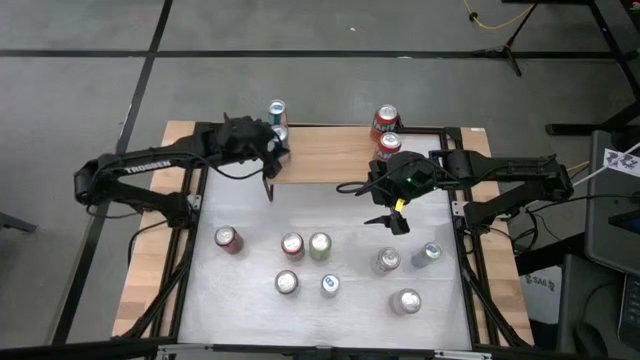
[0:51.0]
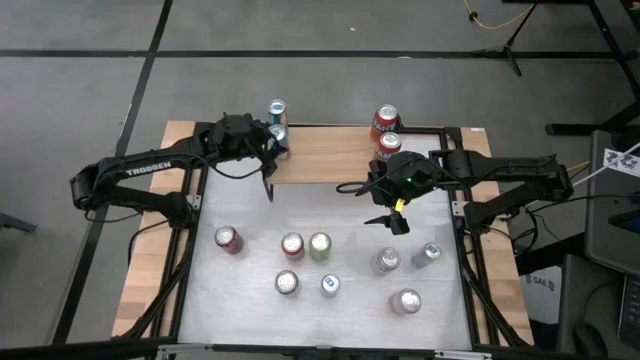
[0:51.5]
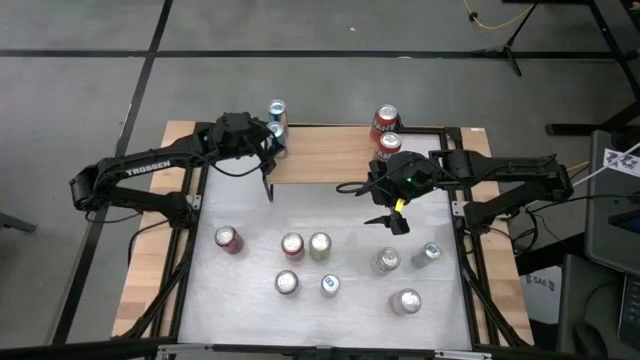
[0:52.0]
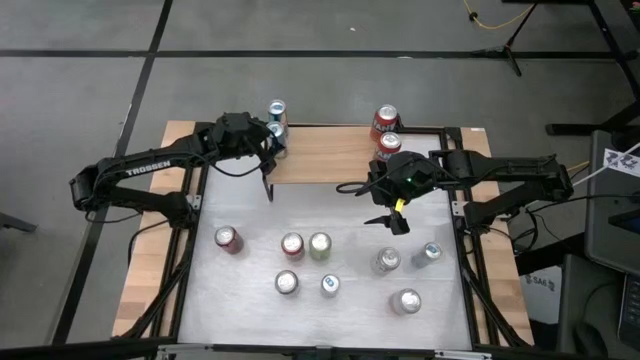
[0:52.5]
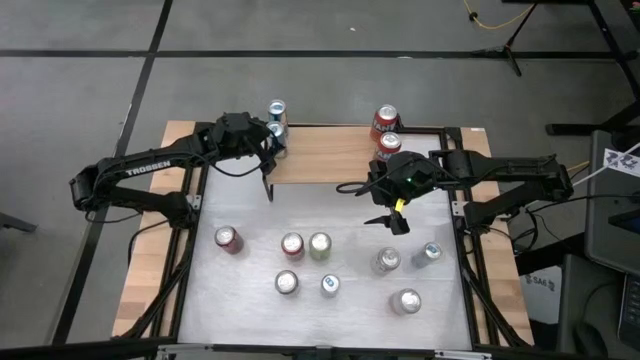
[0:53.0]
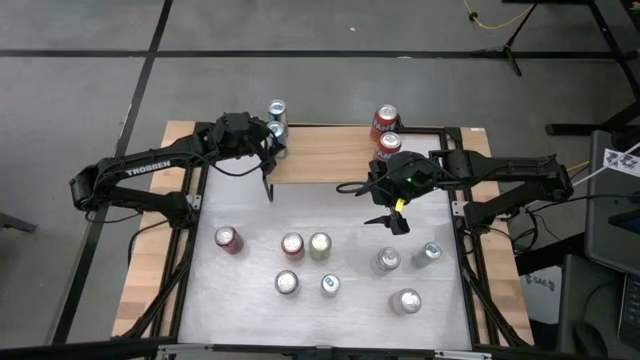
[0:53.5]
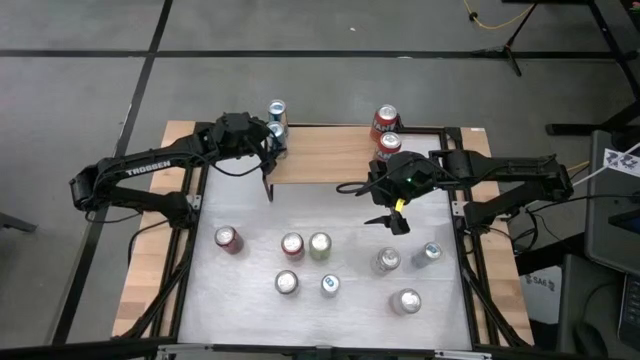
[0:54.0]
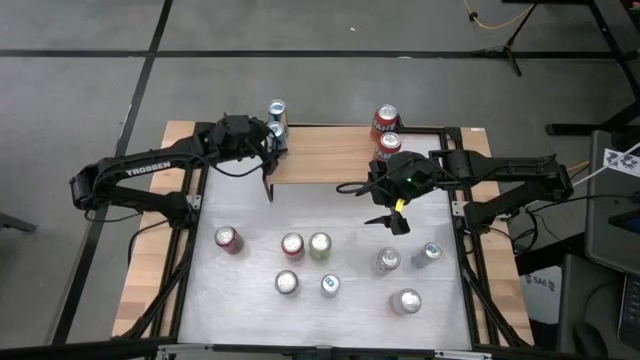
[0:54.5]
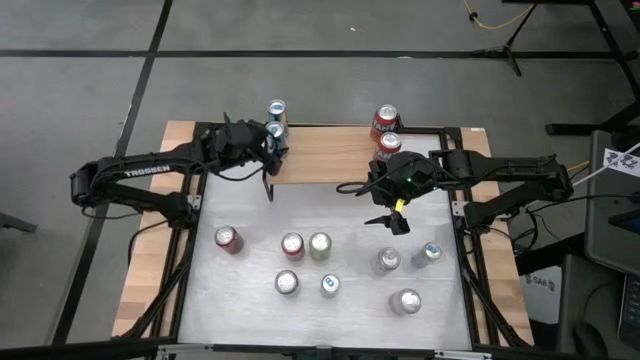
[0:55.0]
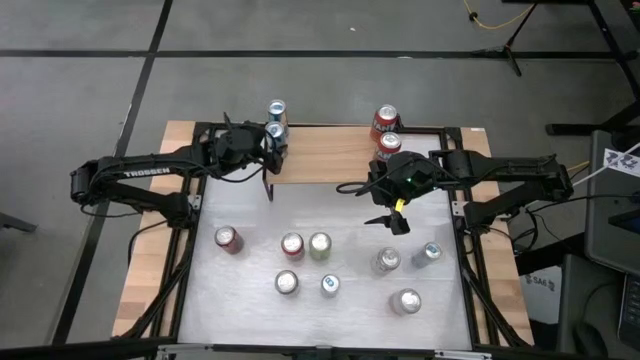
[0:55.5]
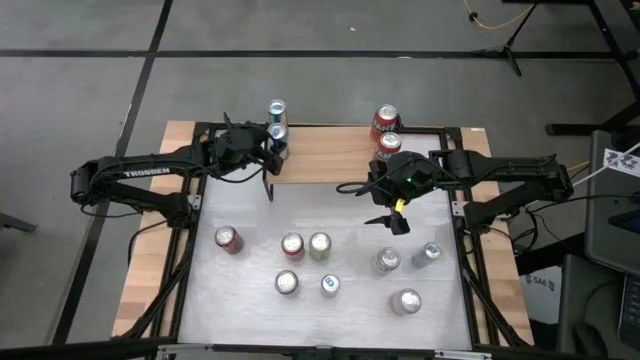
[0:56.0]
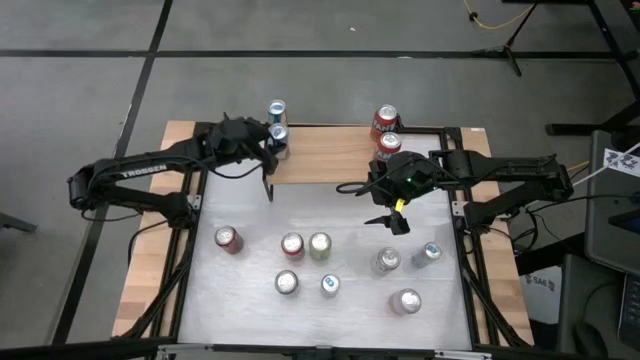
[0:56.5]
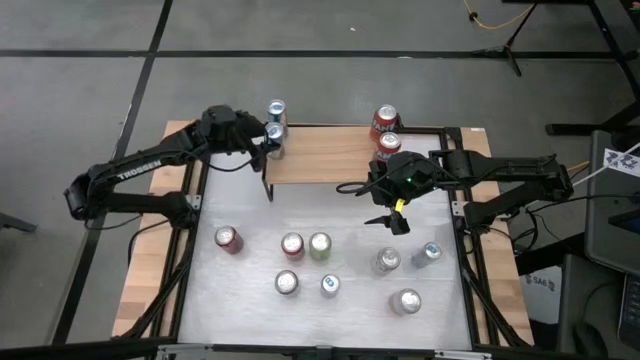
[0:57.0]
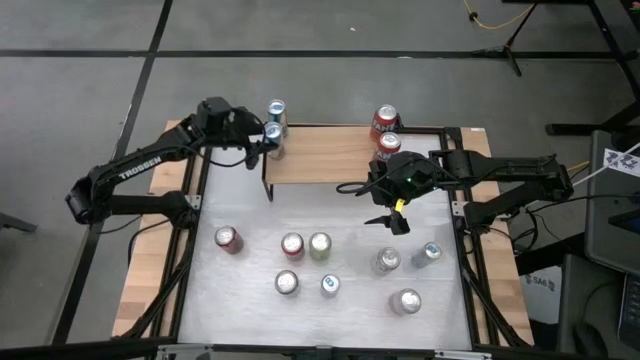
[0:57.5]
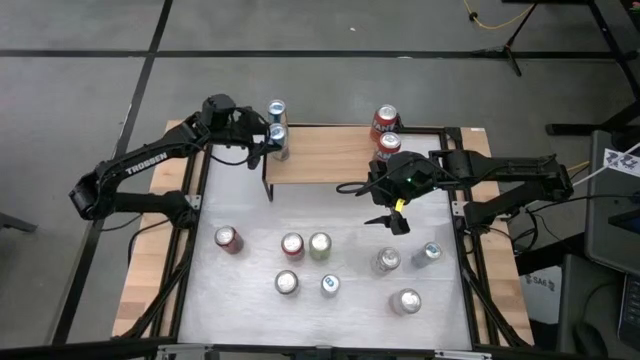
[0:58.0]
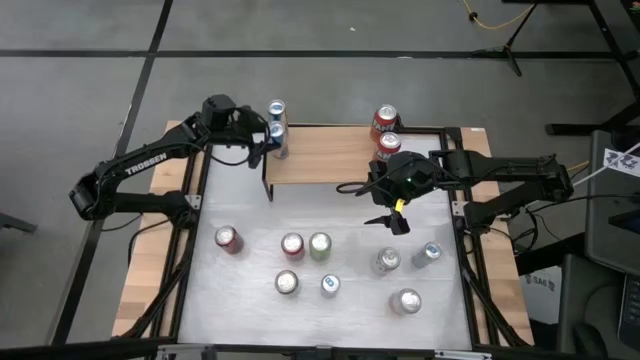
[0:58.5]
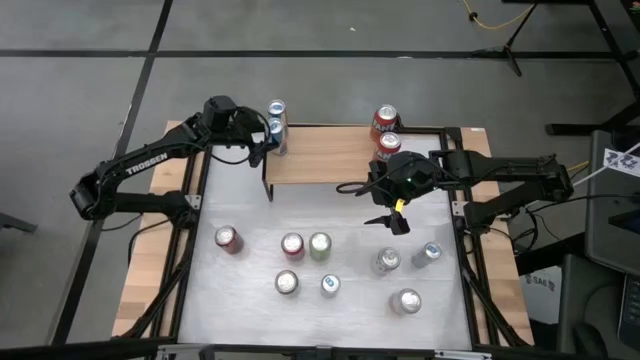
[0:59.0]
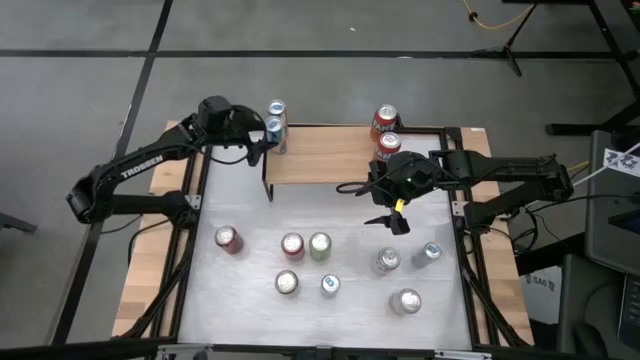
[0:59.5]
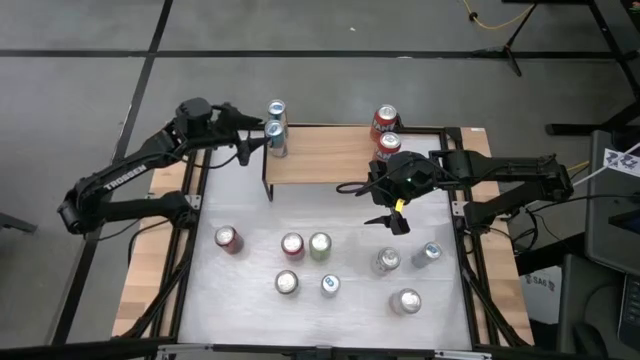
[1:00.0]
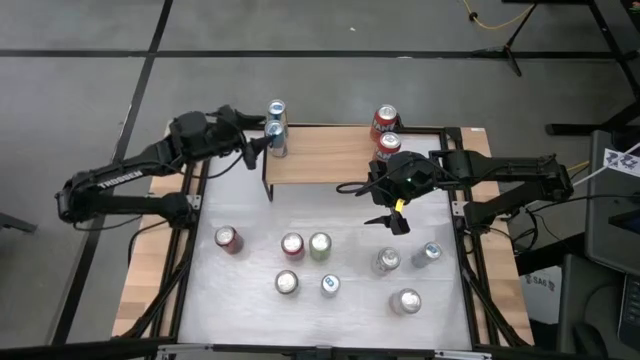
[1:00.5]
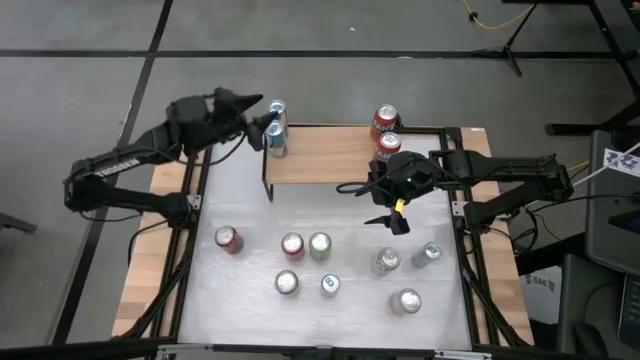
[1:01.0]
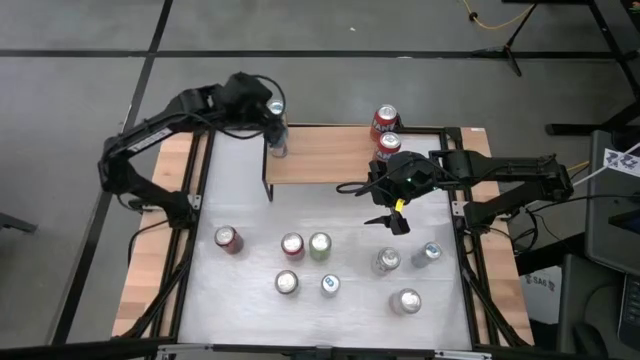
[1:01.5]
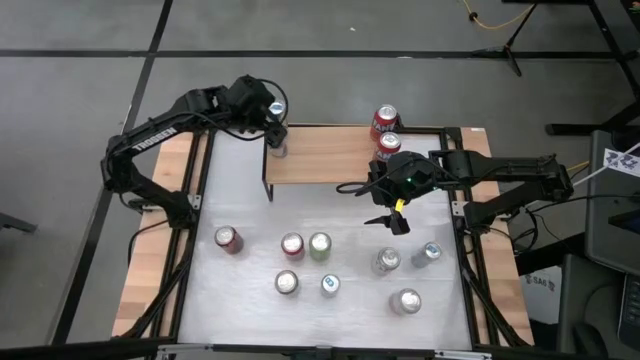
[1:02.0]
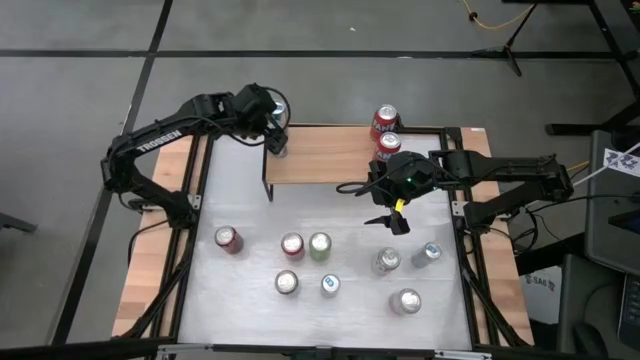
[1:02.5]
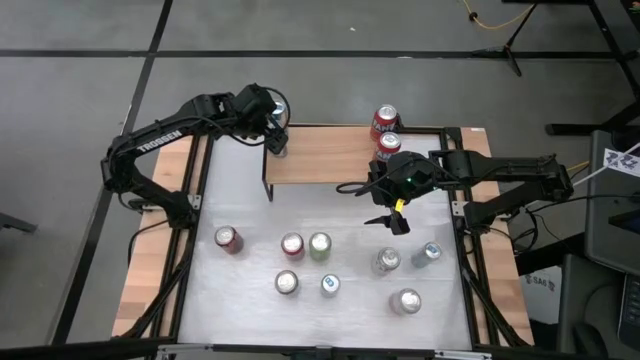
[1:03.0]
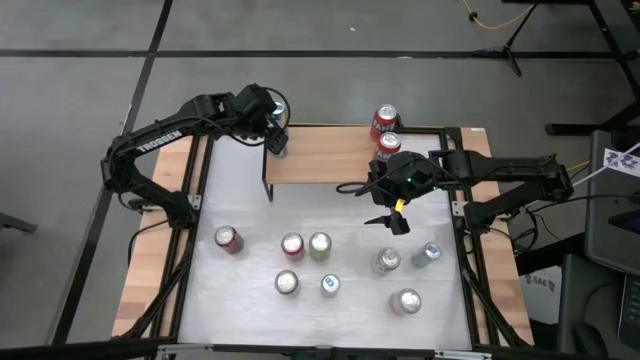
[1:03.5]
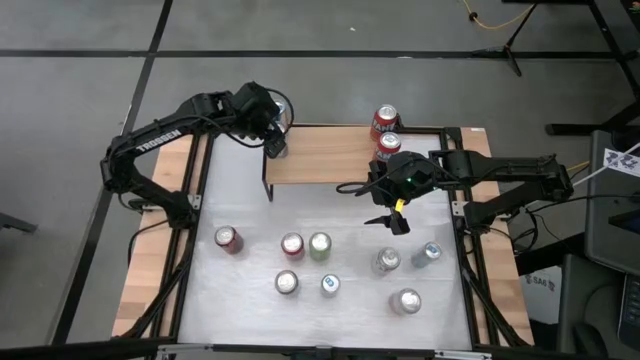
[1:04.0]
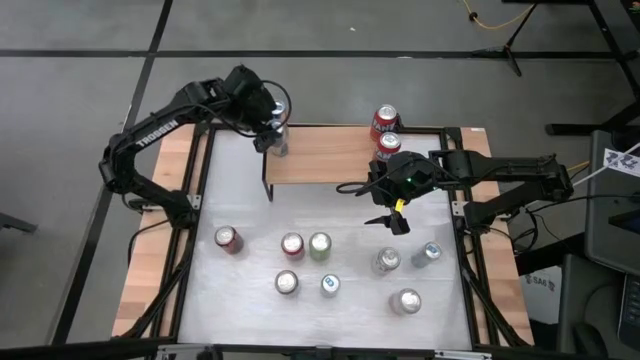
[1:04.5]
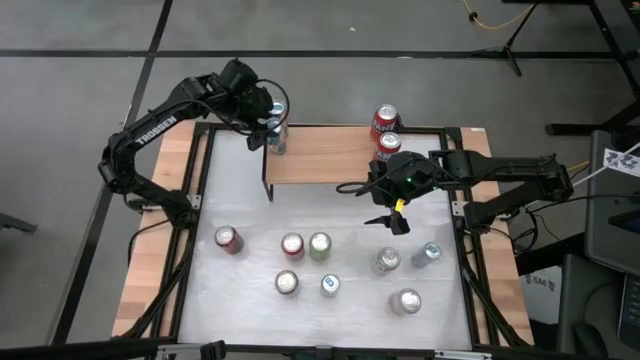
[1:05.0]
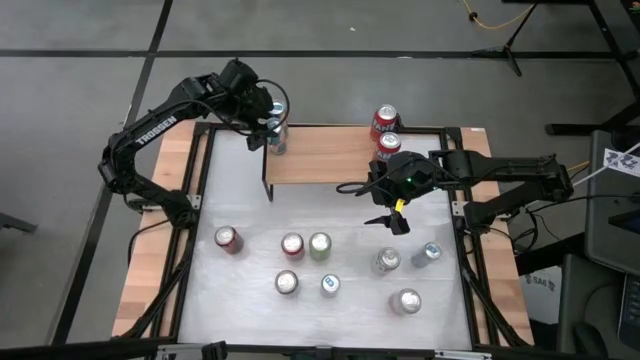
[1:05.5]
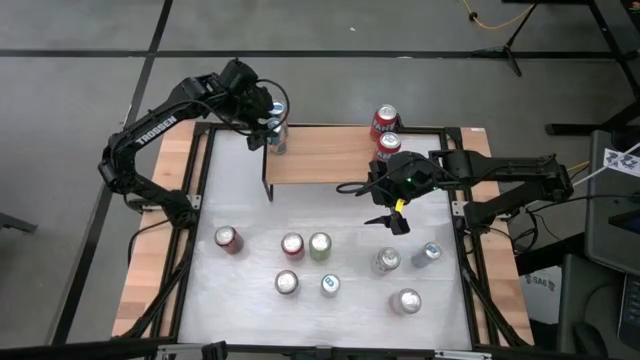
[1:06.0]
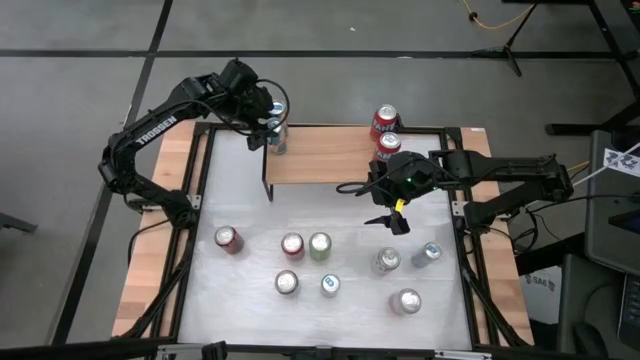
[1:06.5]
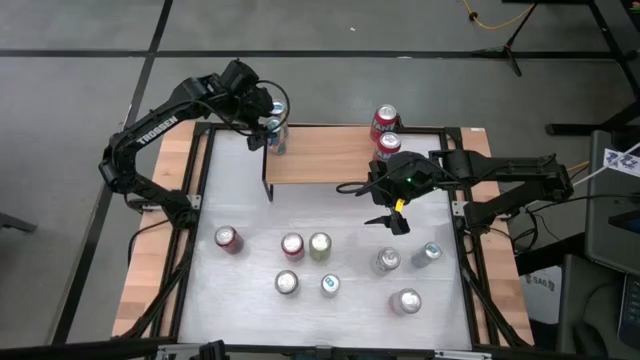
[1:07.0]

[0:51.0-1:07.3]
Task: Sort soda cans
Put the bottom left blue soda can on the shelf aligned with the blue soda can

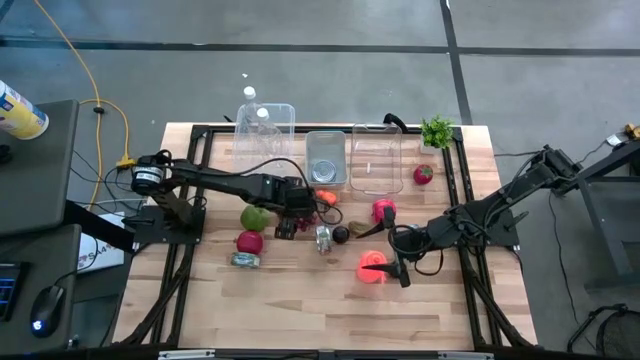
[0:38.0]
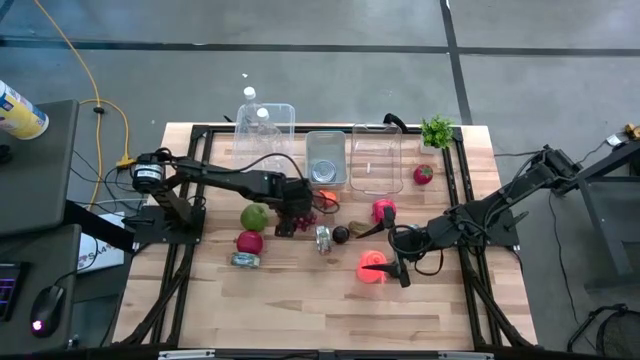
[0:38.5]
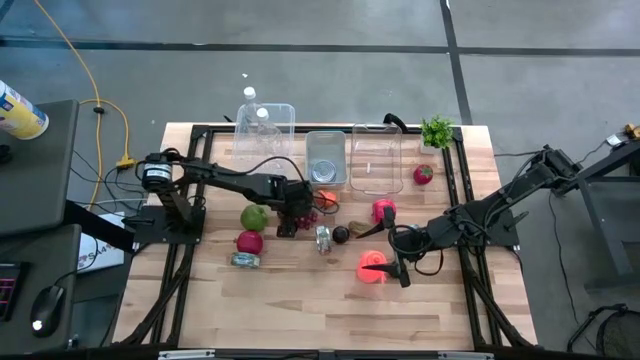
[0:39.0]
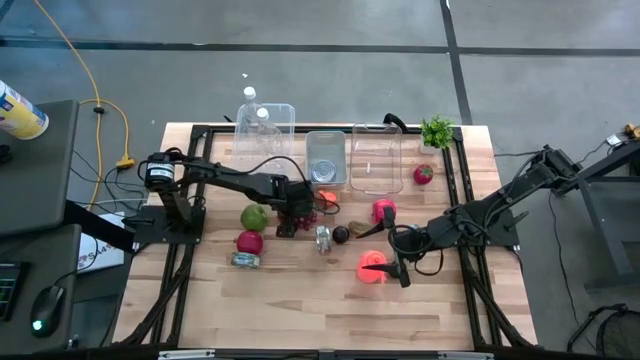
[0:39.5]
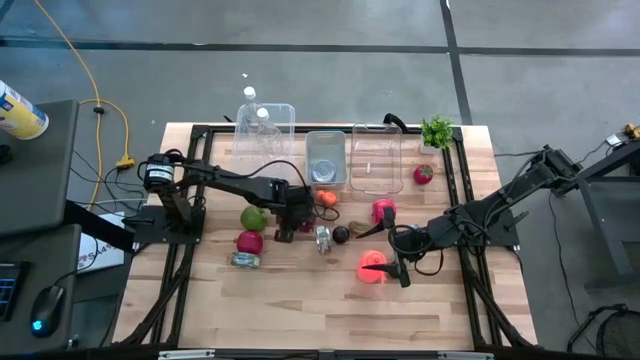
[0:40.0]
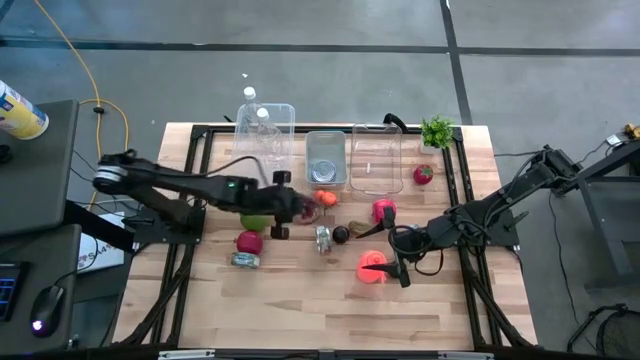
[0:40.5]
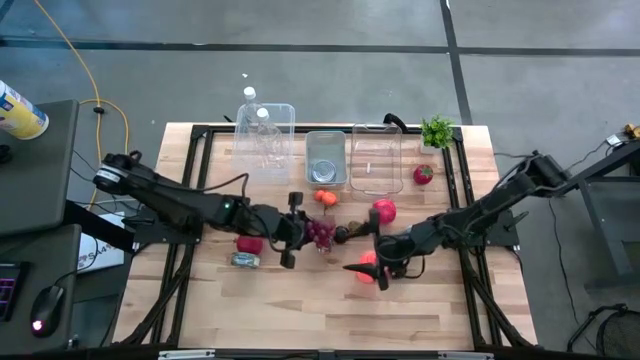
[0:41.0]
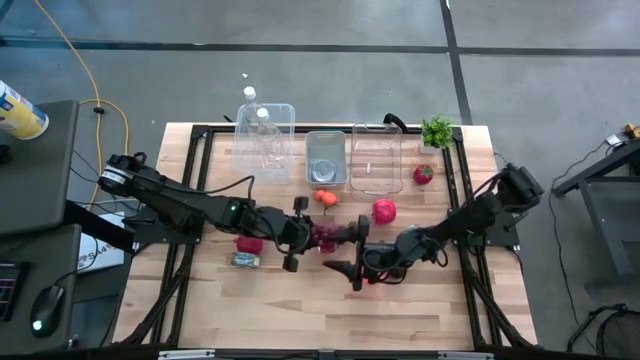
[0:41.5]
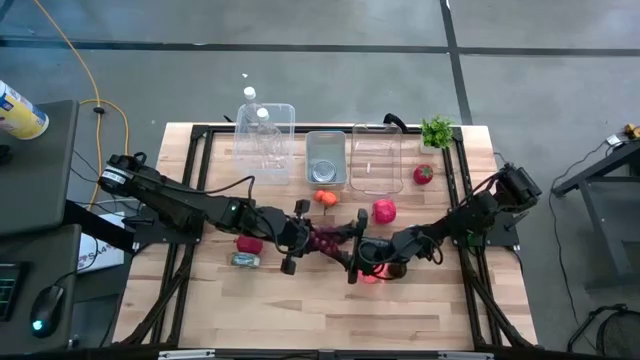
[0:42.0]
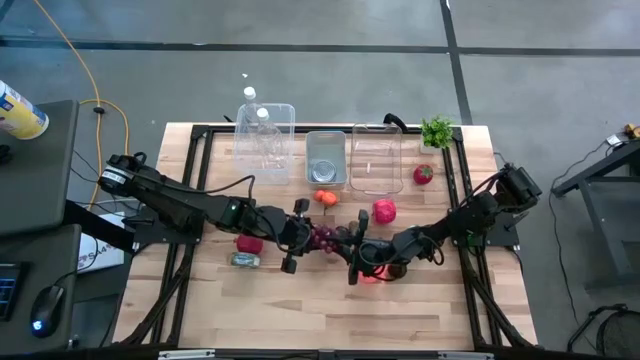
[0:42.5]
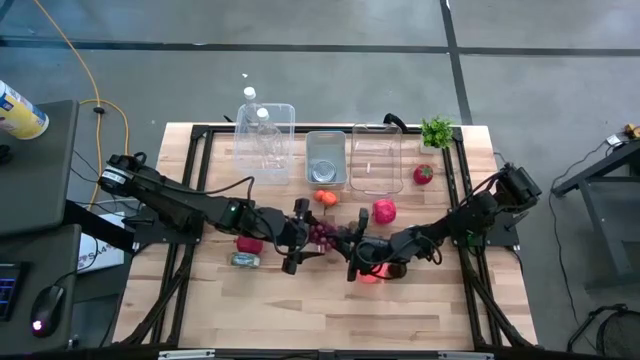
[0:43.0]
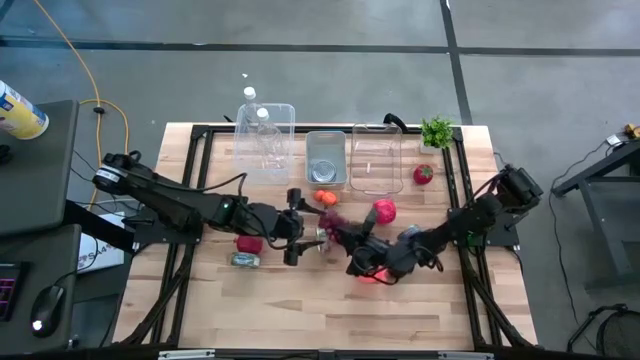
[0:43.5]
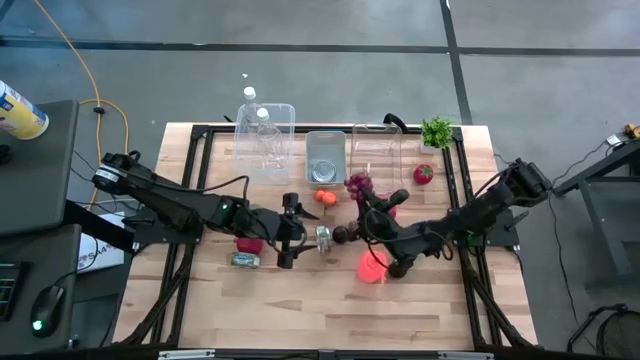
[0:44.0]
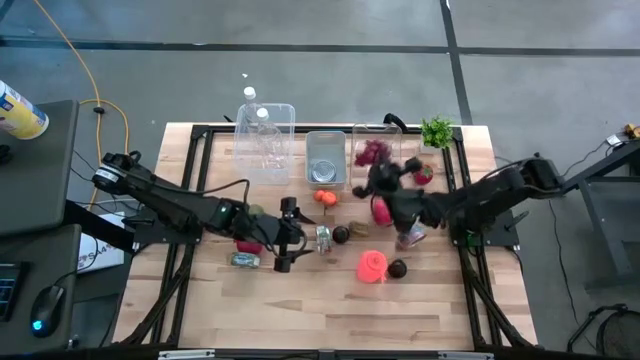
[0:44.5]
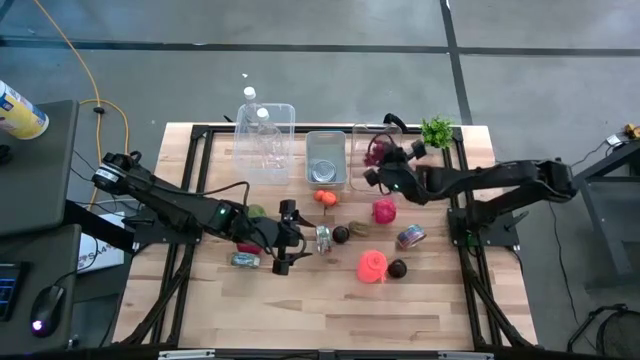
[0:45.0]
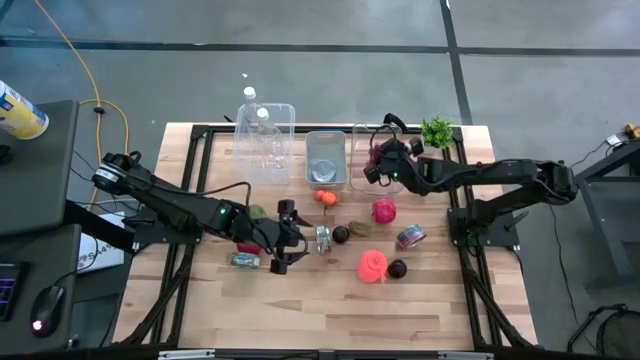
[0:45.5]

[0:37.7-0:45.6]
Task: Pick & Place Food Item
Put the grapes into the transparent bin
